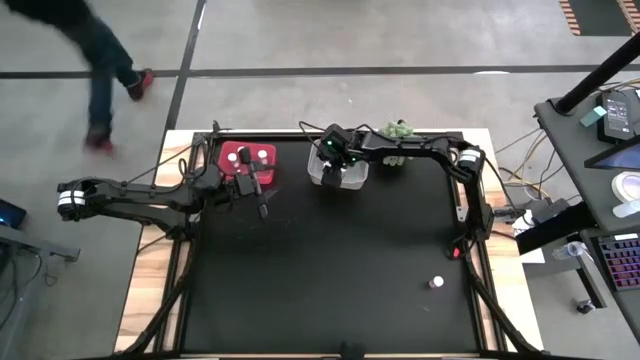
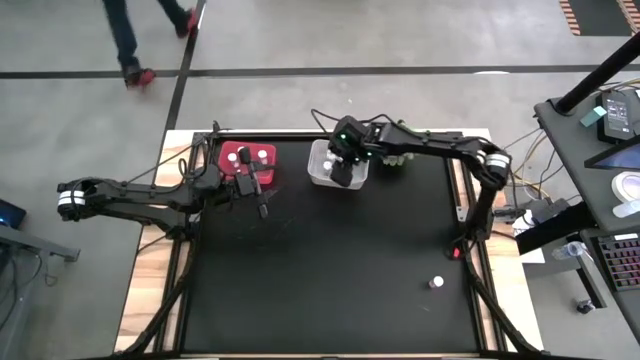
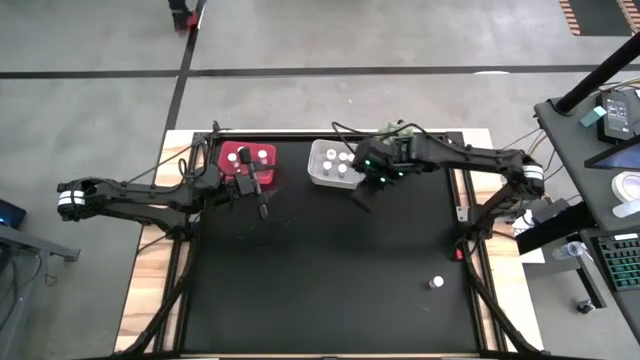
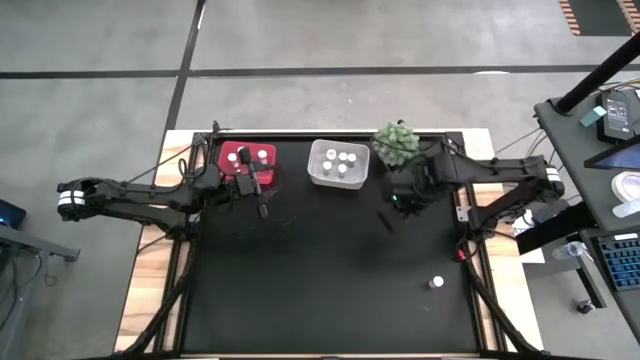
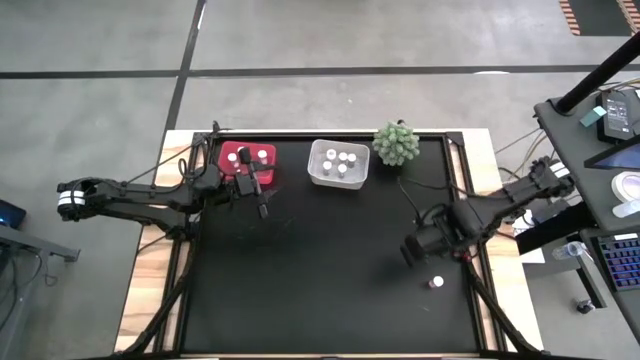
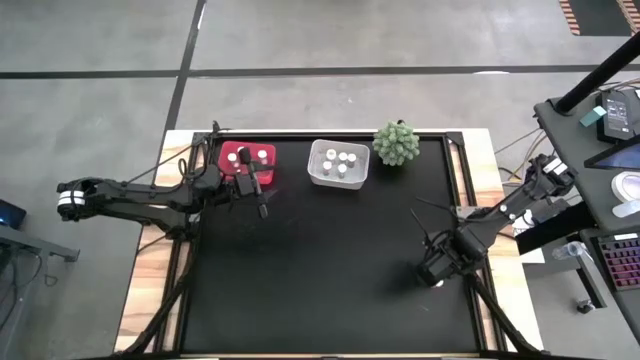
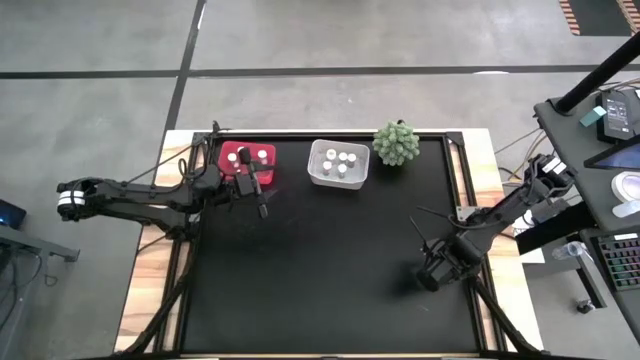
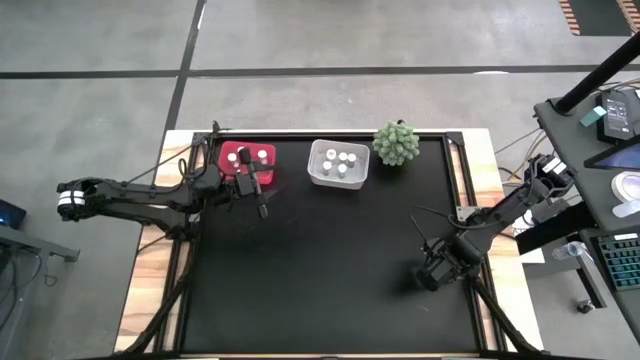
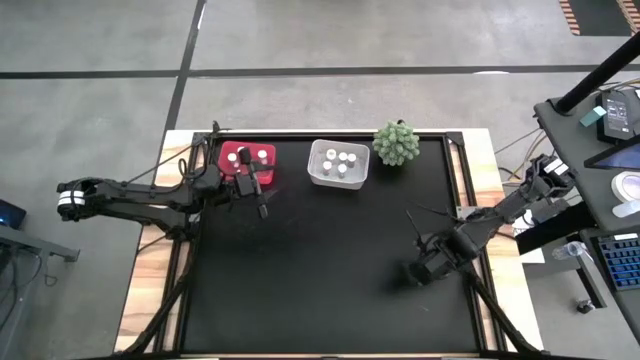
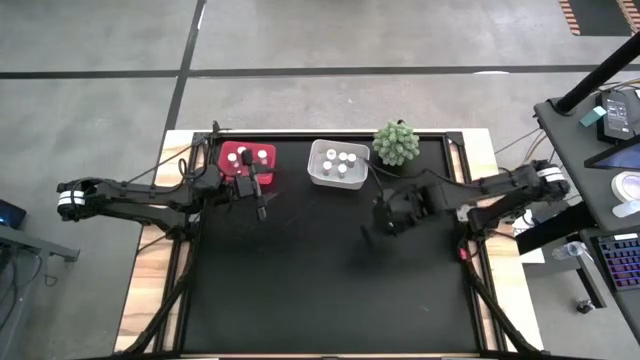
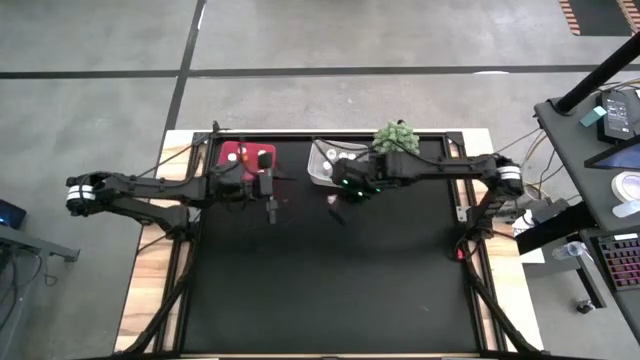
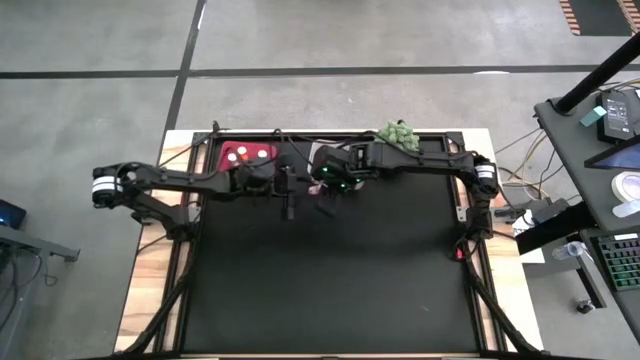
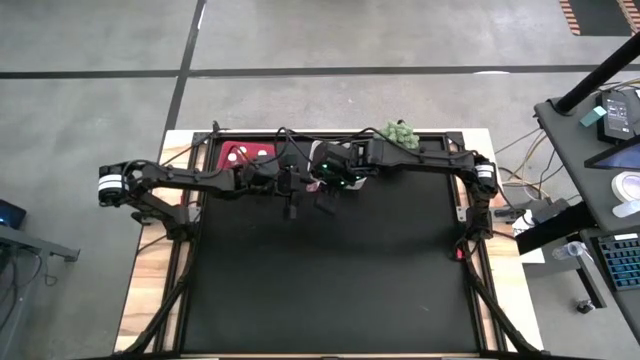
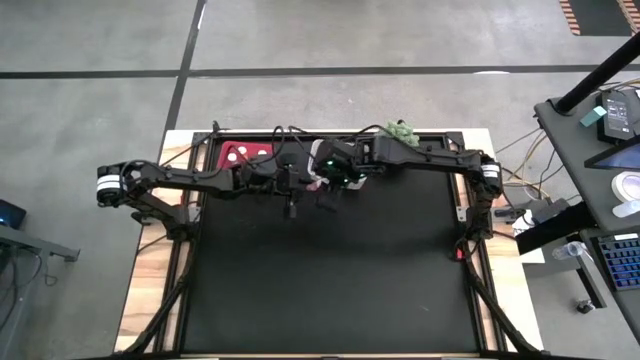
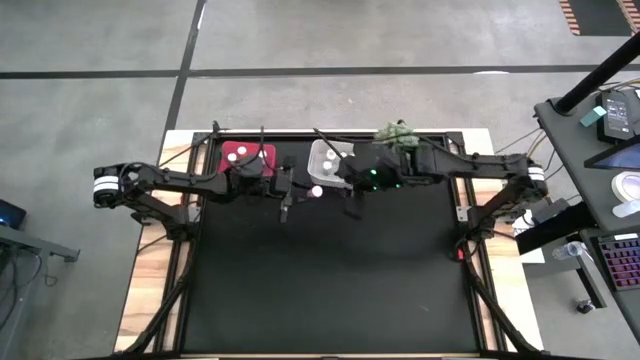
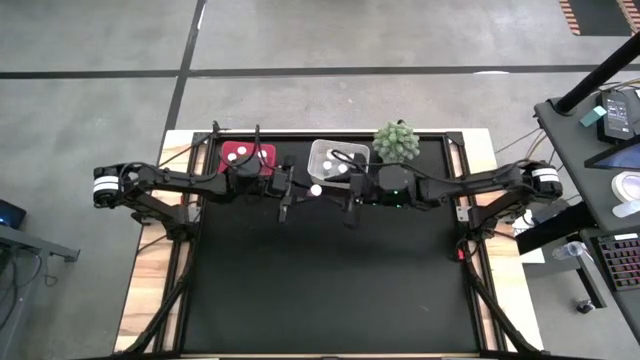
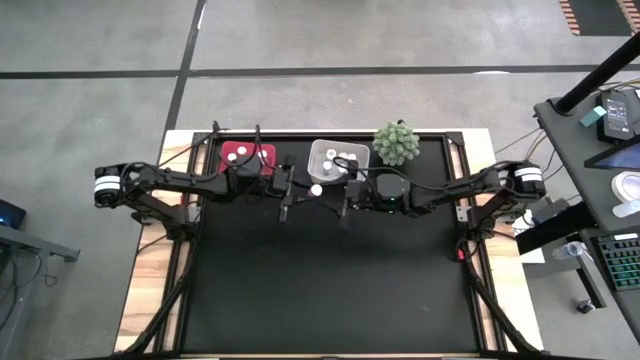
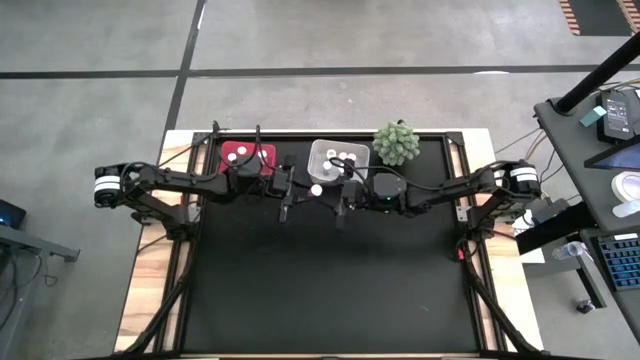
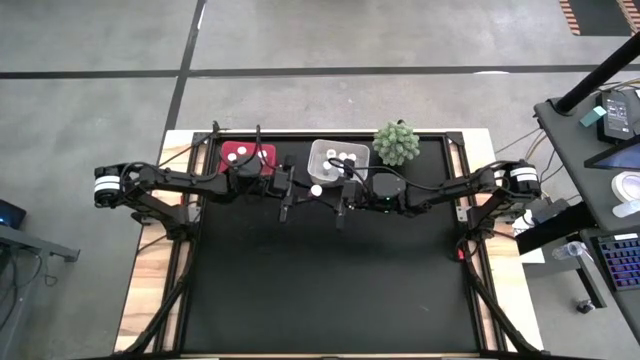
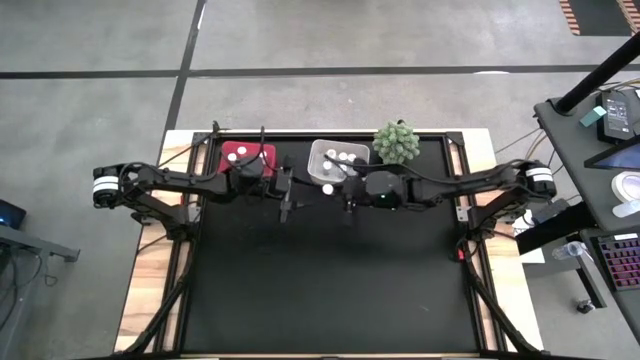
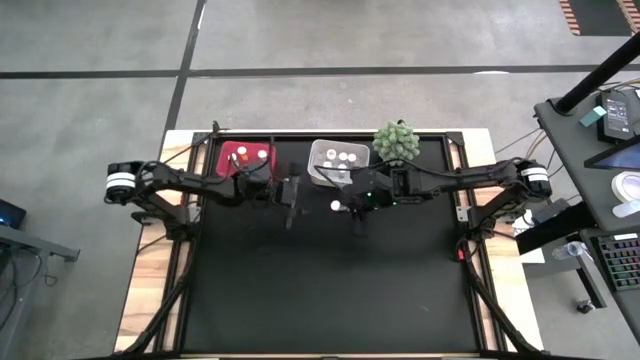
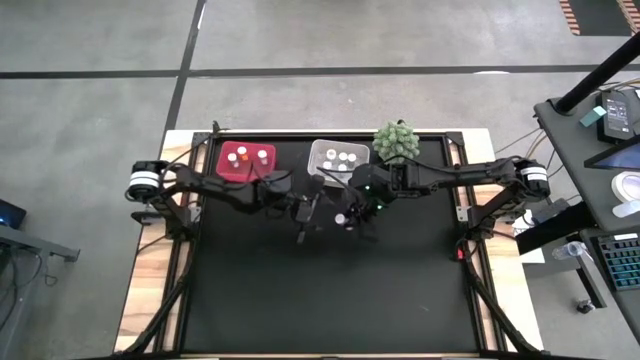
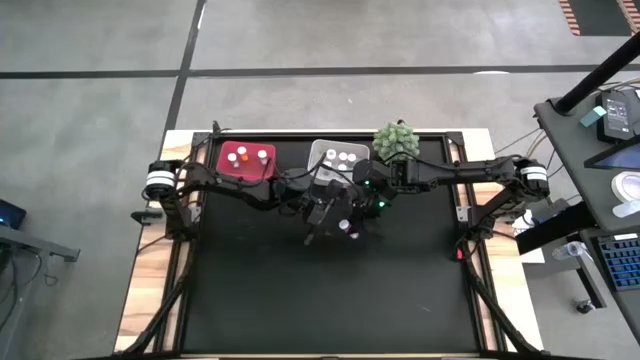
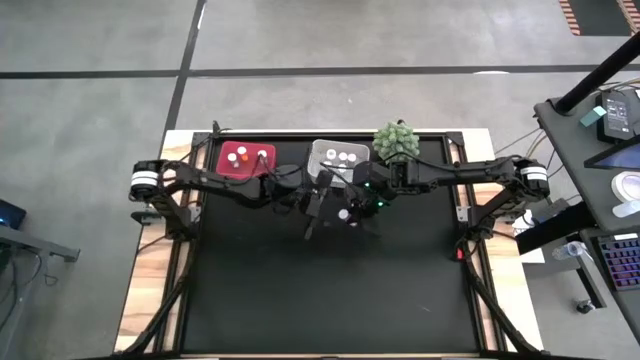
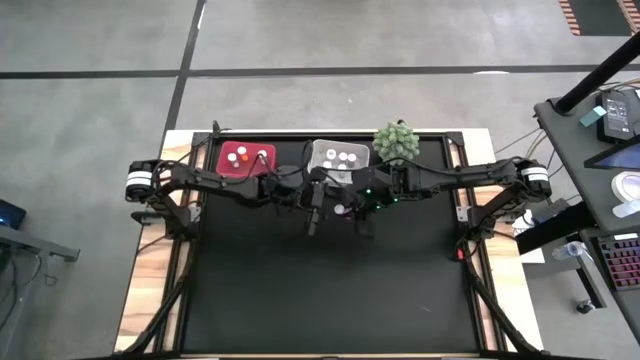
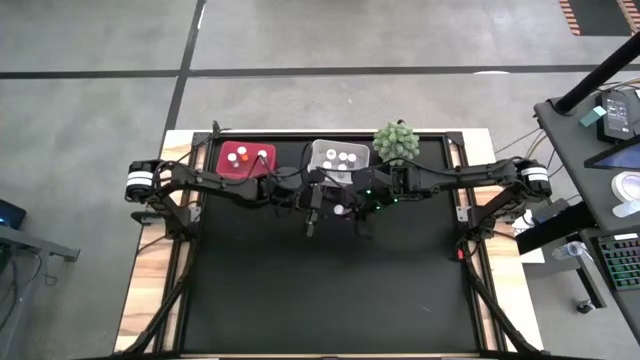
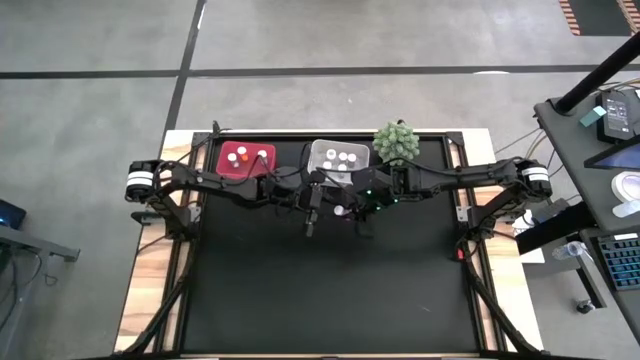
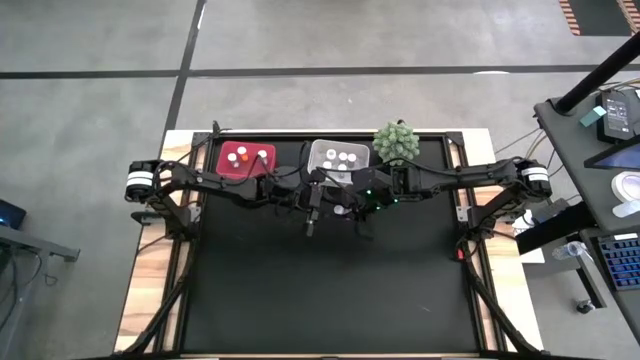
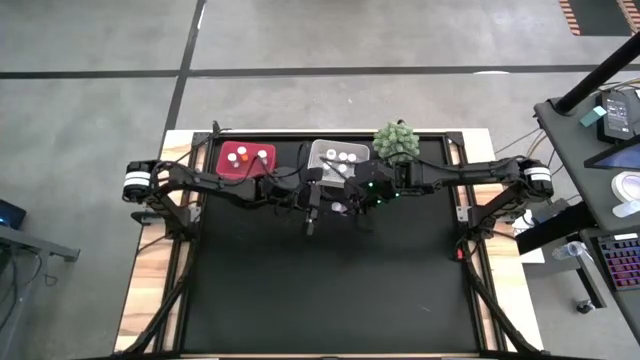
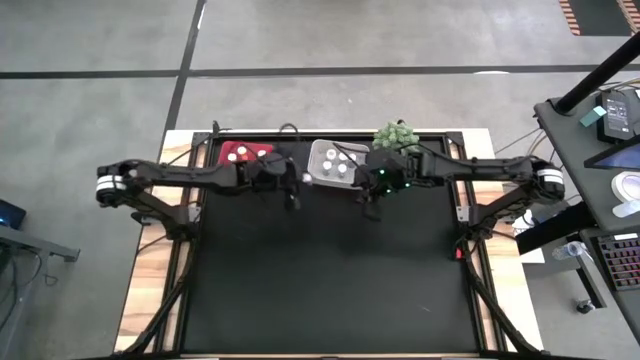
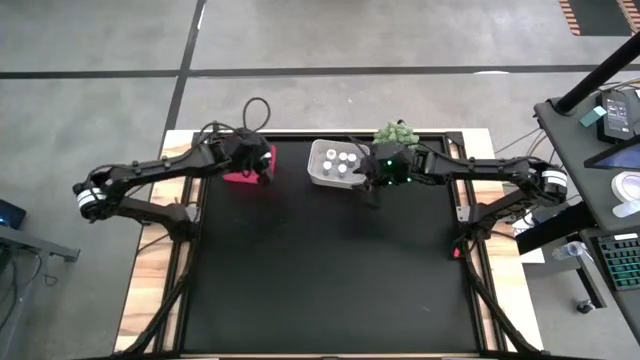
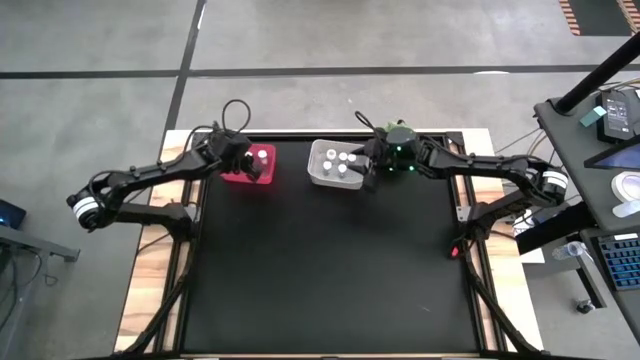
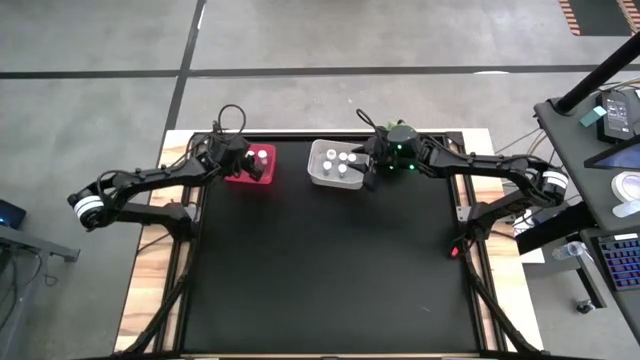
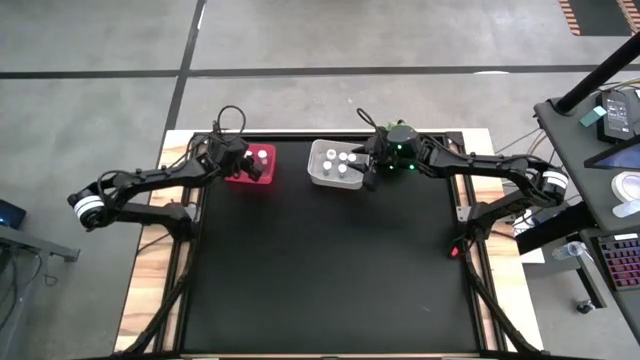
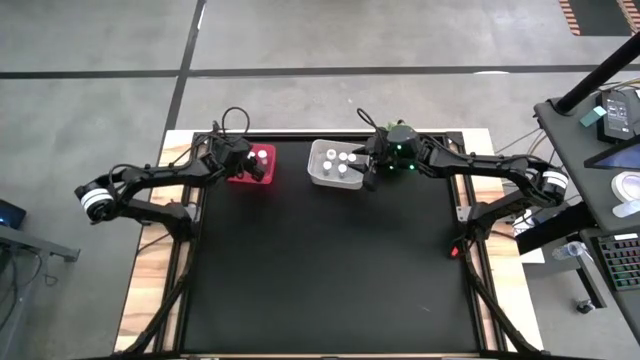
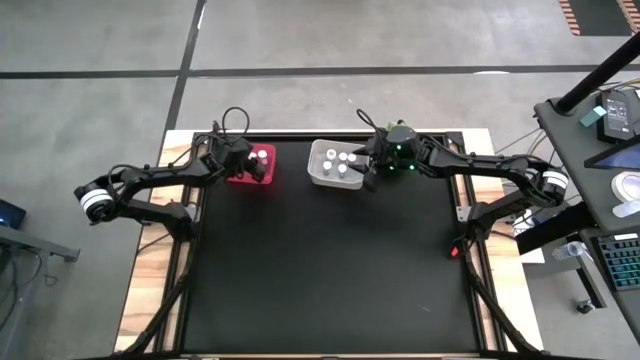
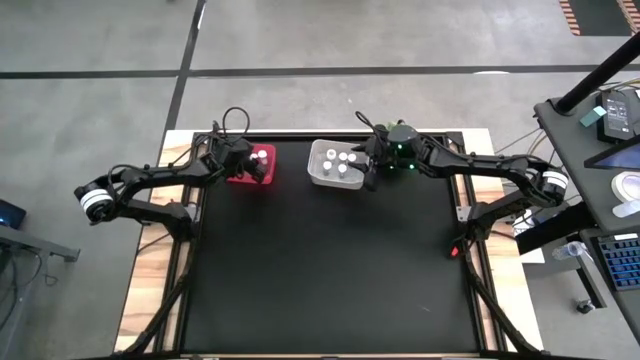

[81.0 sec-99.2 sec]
Task: Pick and place medicine bottles into bin by pill shape (circle, oval)
Put the pink tablet bottle into the pink bin

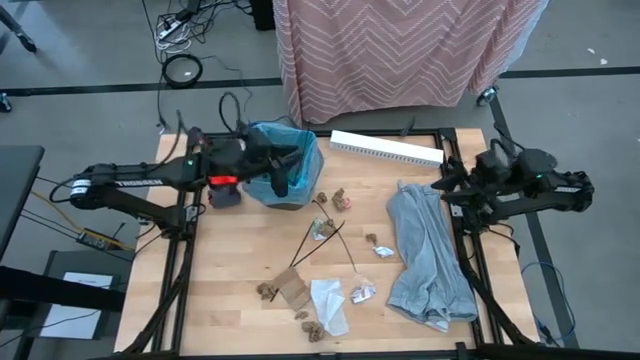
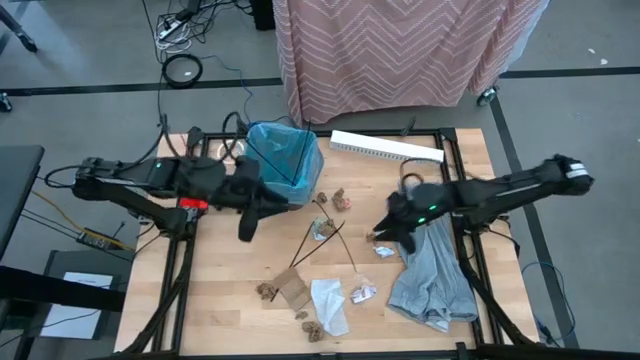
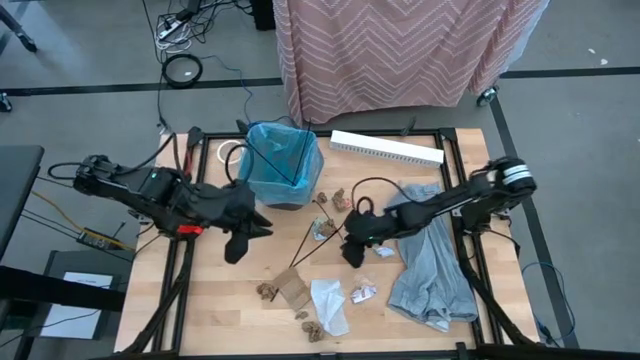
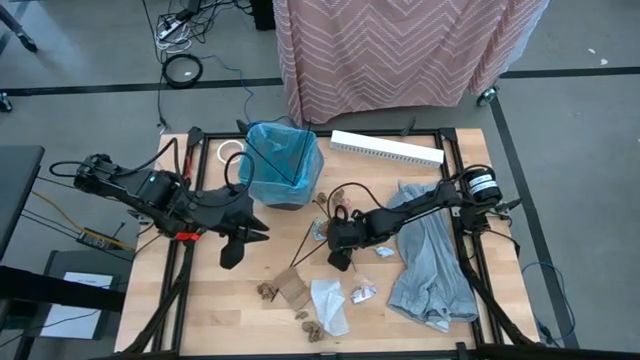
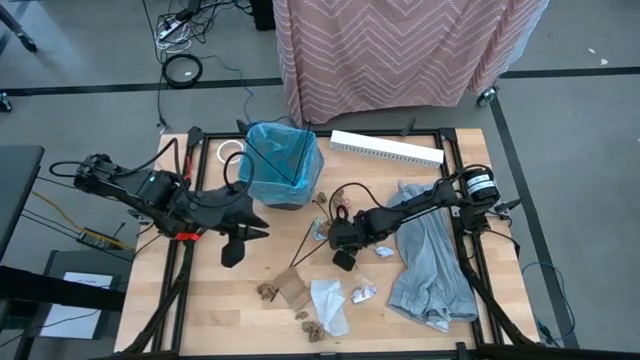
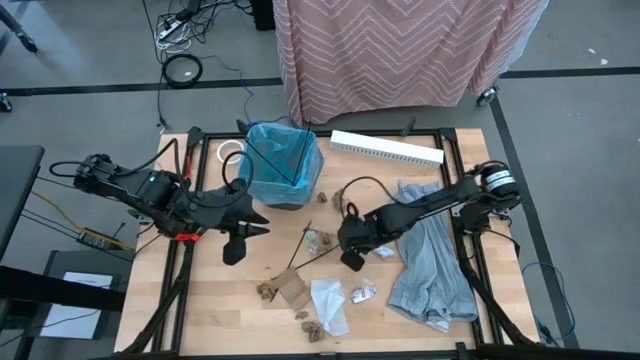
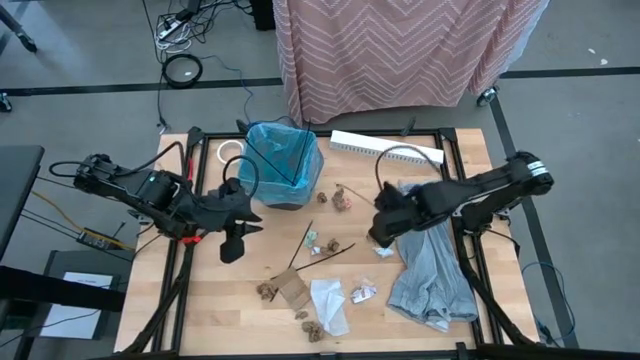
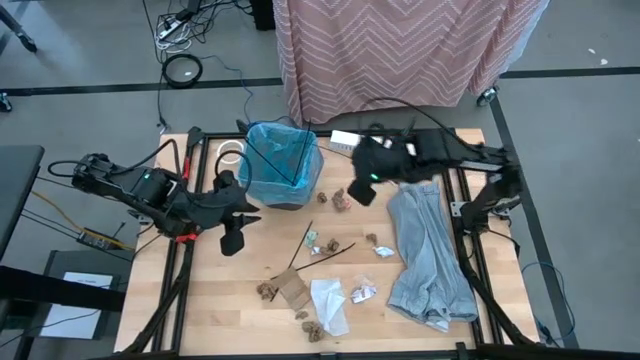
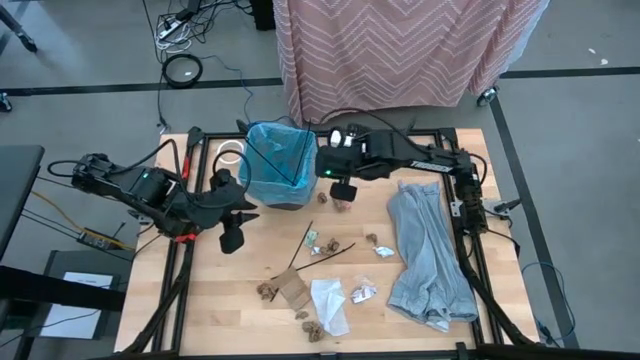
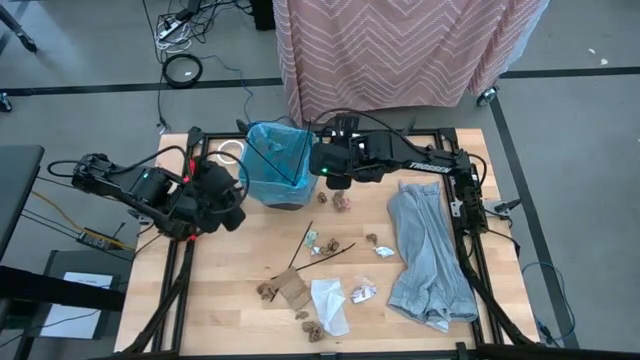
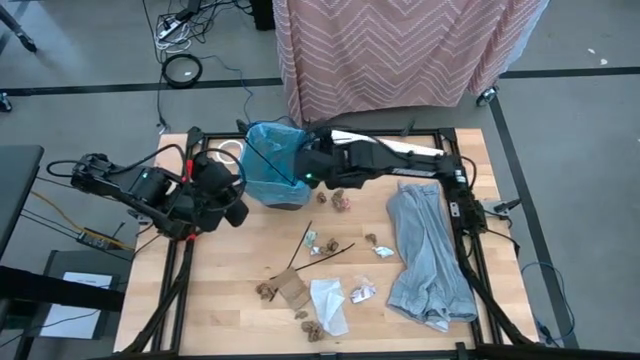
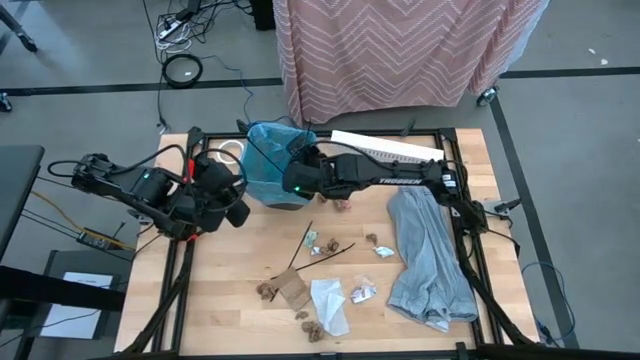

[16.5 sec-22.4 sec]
Task: place trash/remove bag and relplace
Put the black zip tie into the black trash bin
